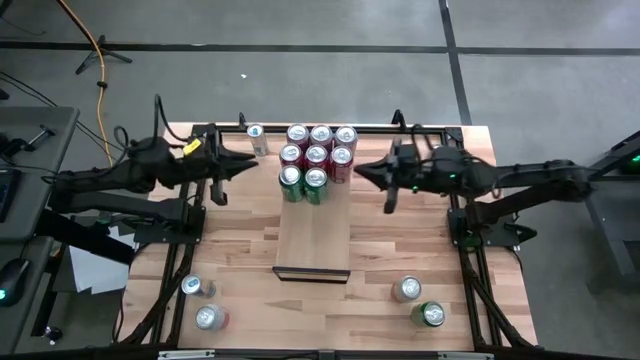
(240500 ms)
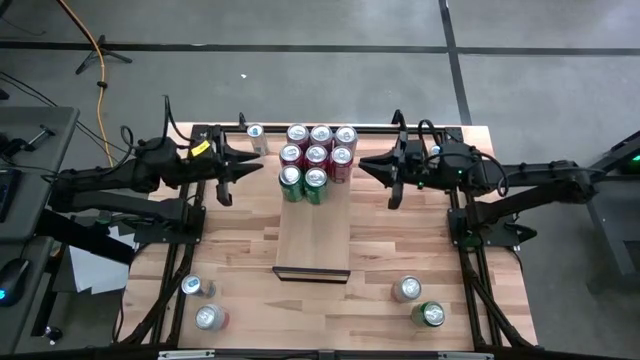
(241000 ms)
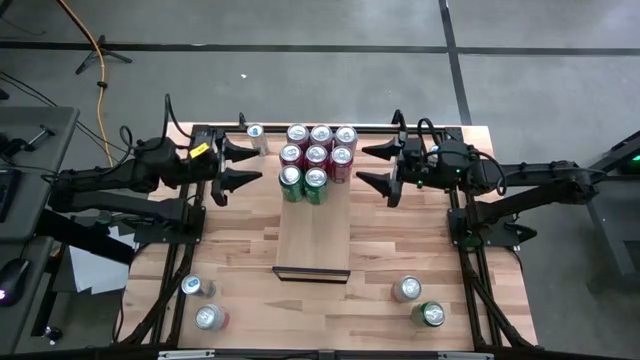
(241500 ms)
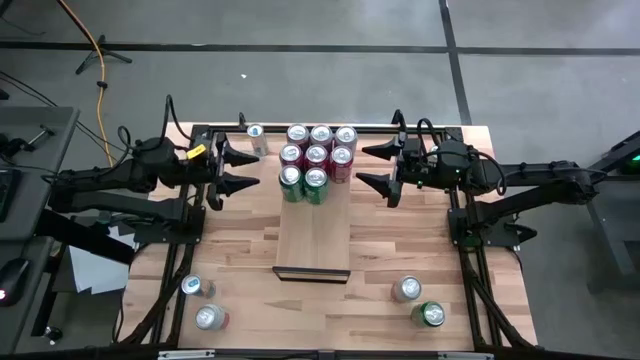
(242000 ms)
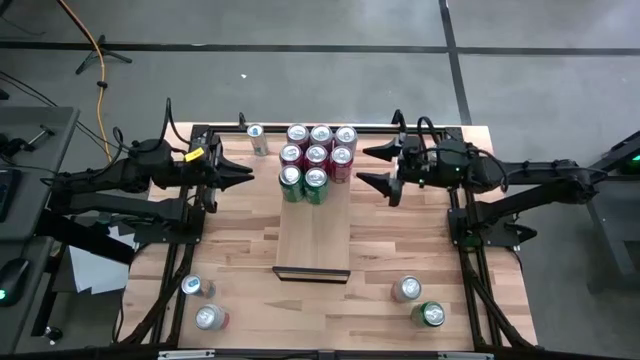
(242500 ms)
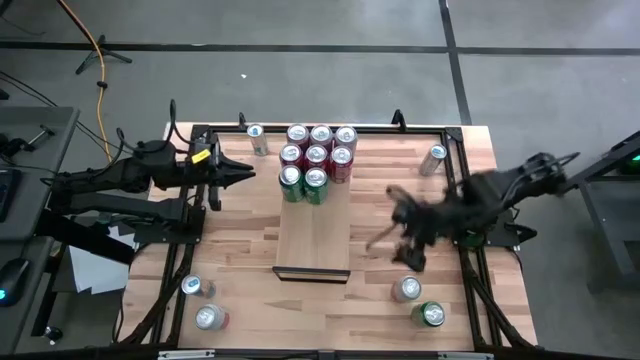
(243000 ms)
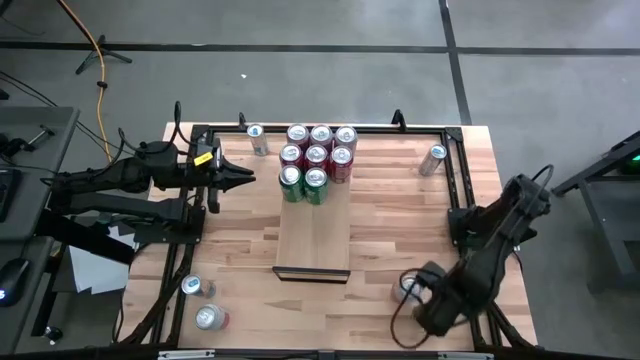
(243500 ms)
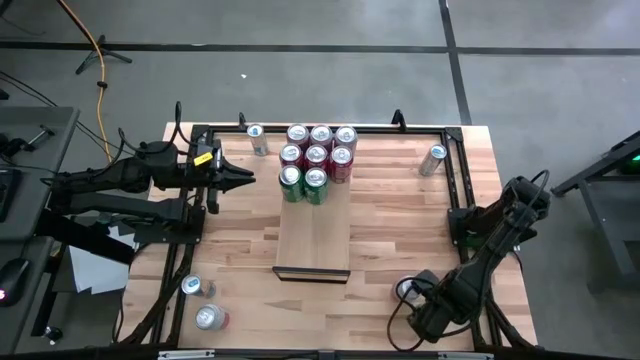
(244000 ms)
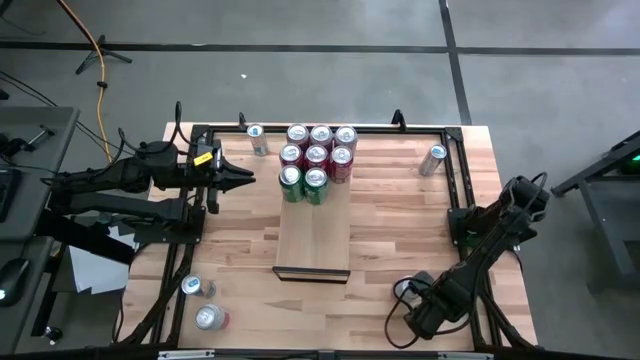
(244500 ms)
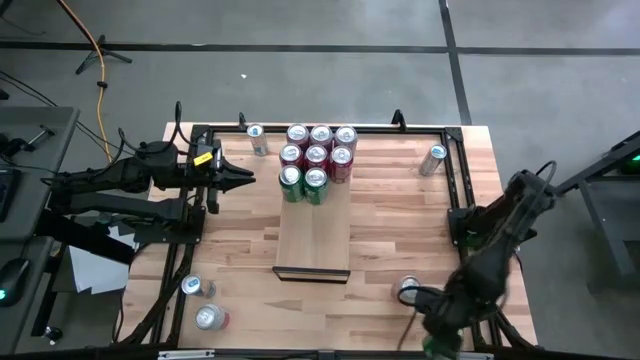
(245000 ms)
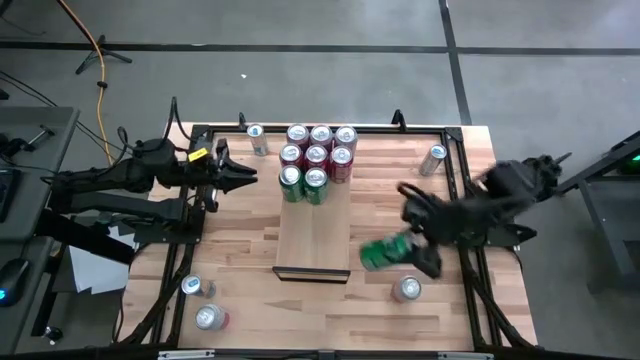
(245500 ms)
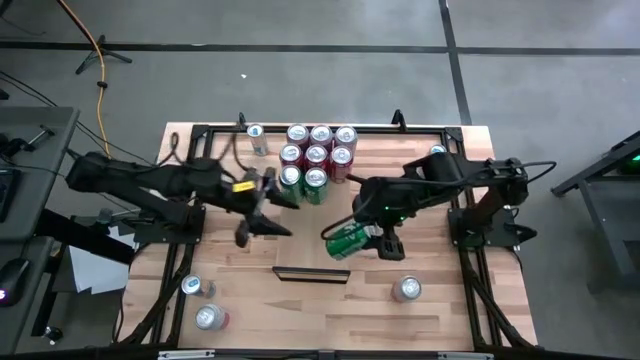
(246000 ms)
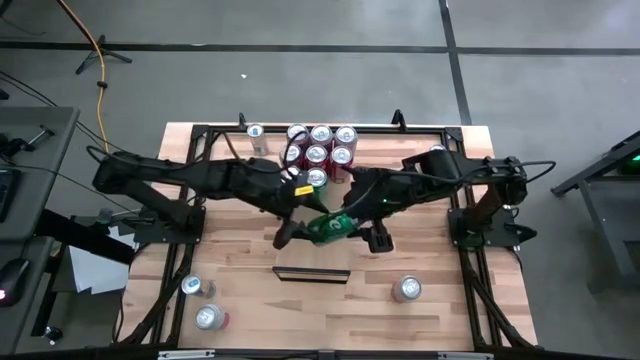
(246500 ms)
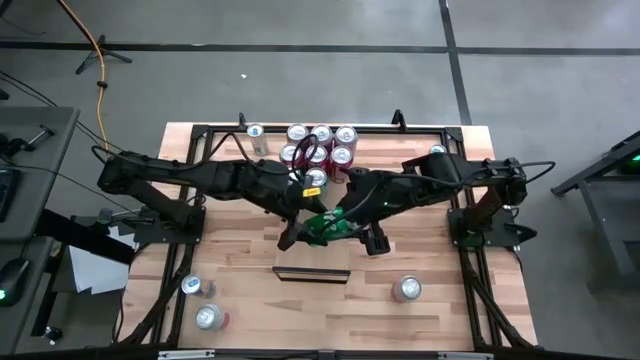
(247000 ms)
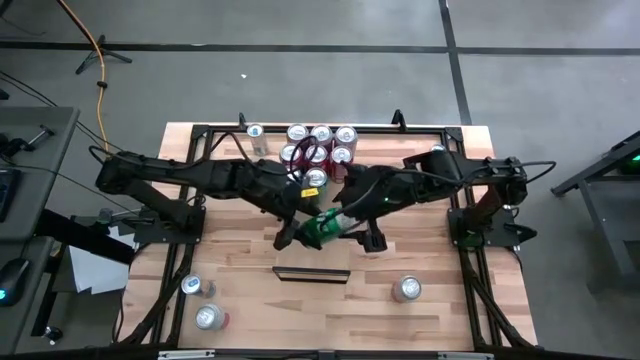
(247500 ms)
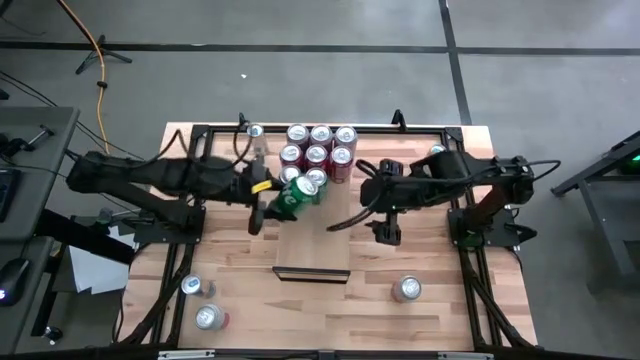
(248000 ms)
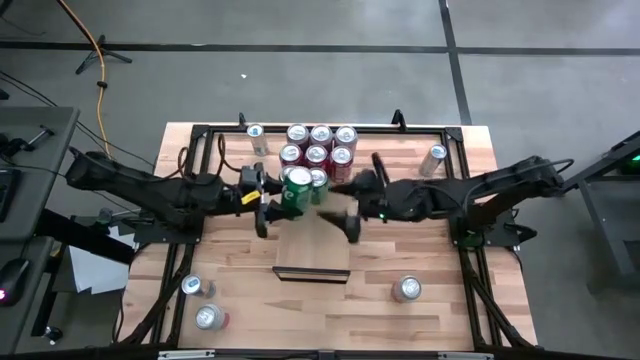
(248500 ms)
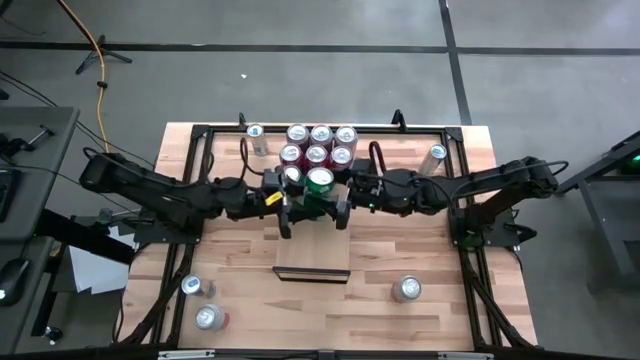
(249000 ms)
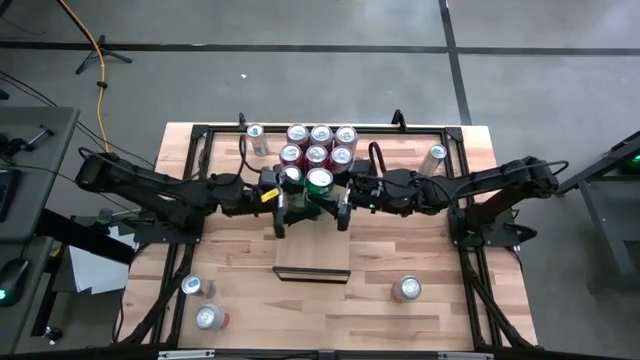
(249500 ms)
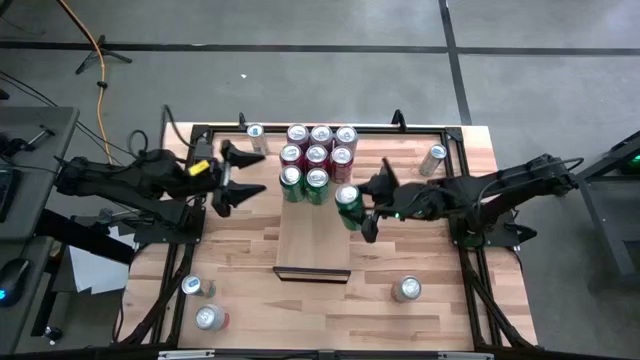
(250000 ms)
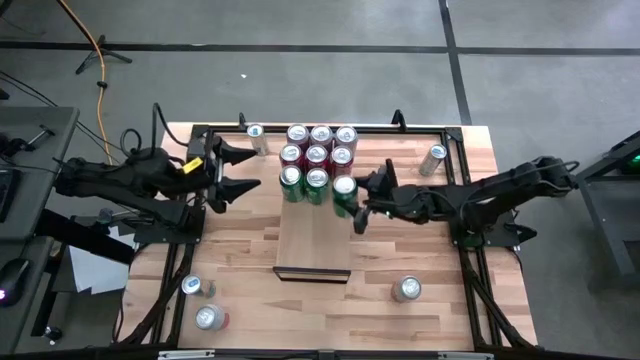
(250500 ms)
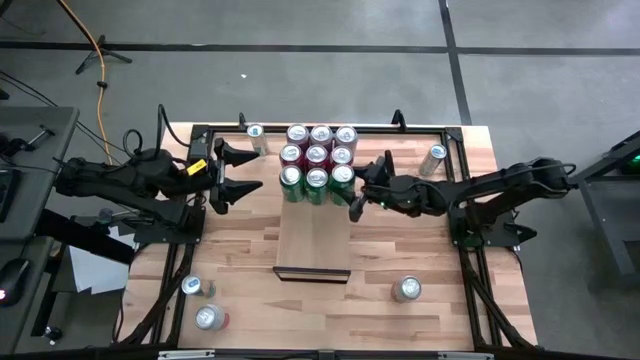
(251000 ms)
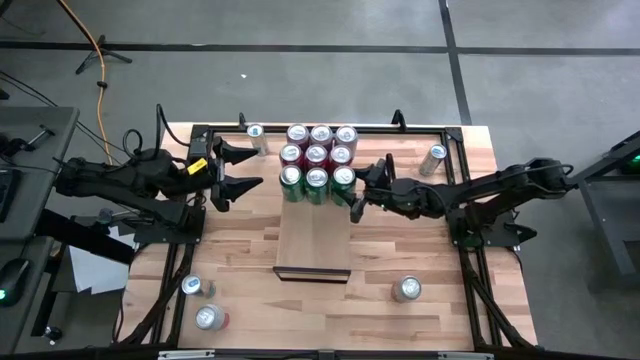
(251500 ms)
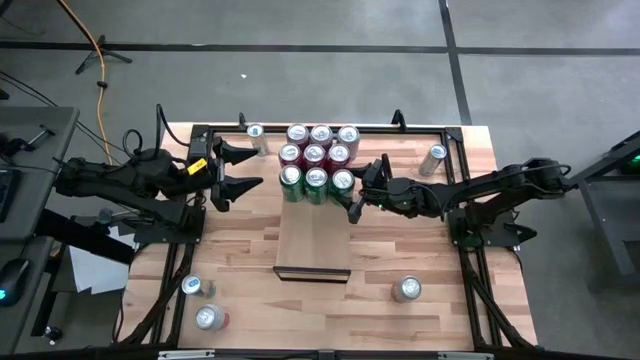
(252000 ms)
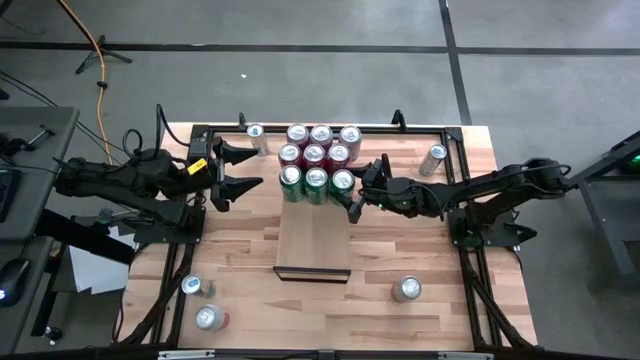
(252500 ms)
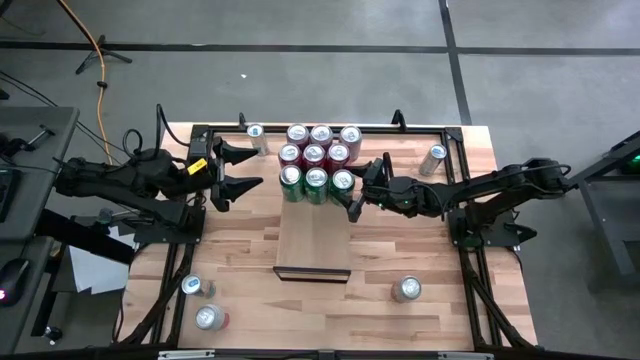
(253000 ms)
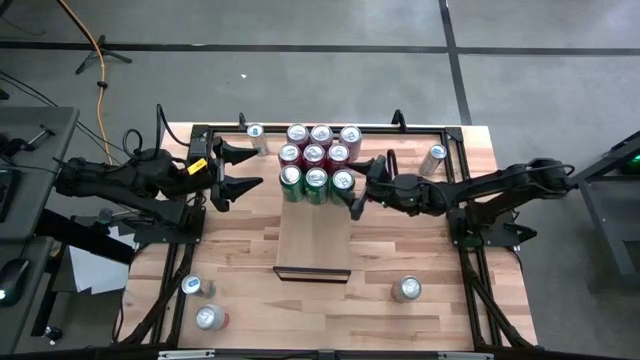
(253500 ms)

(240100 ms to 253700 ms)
Task: Place canned beverage on shelf
Put the green soda can on the shelf

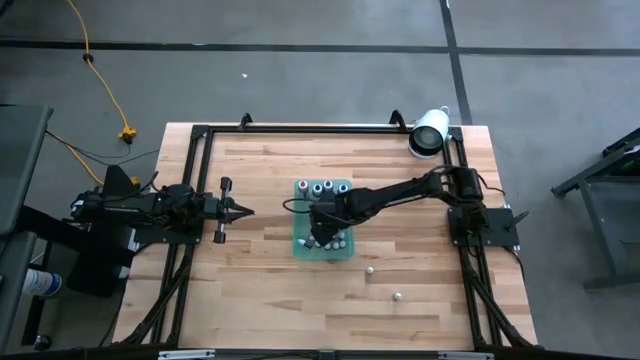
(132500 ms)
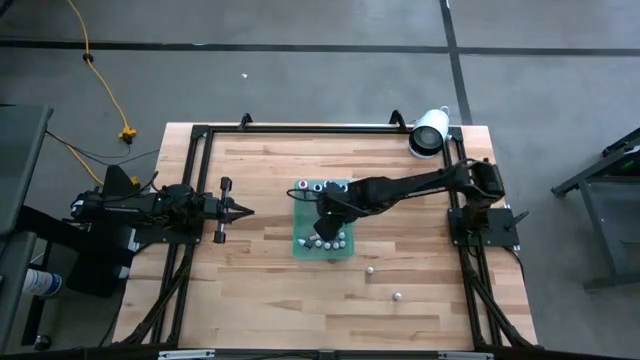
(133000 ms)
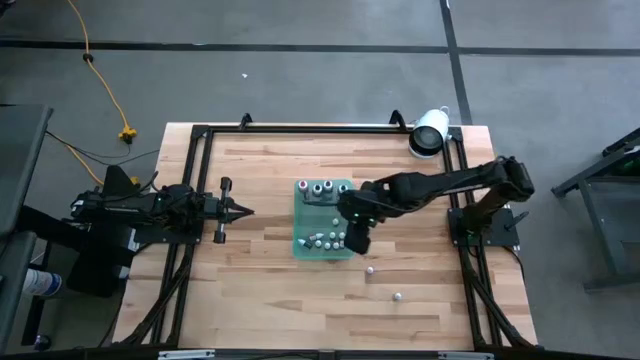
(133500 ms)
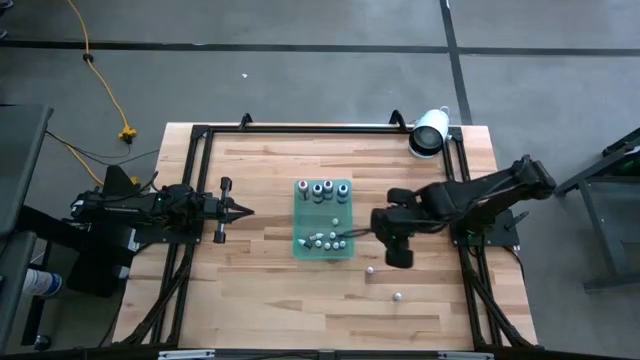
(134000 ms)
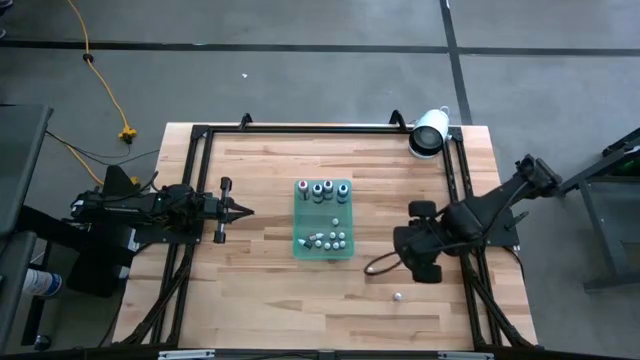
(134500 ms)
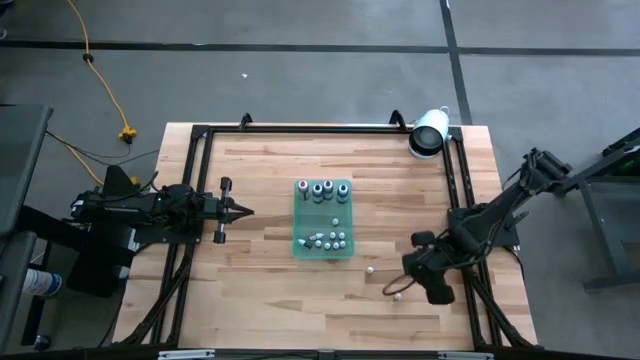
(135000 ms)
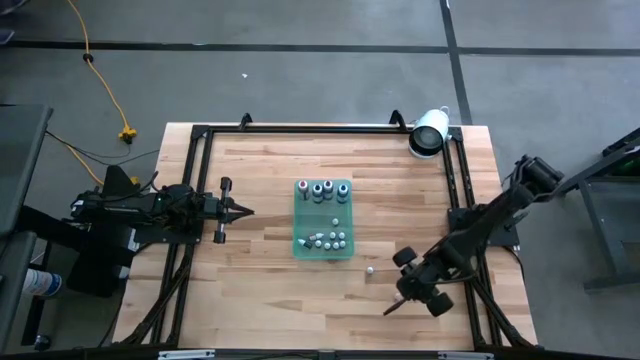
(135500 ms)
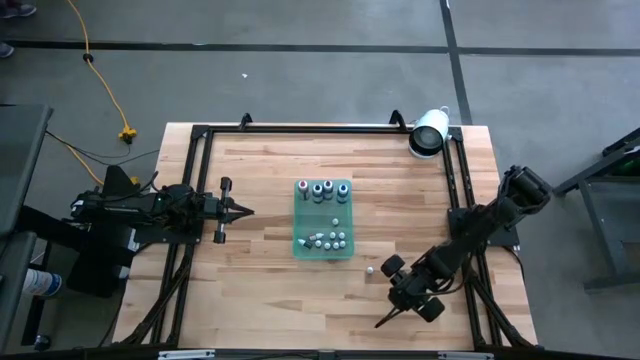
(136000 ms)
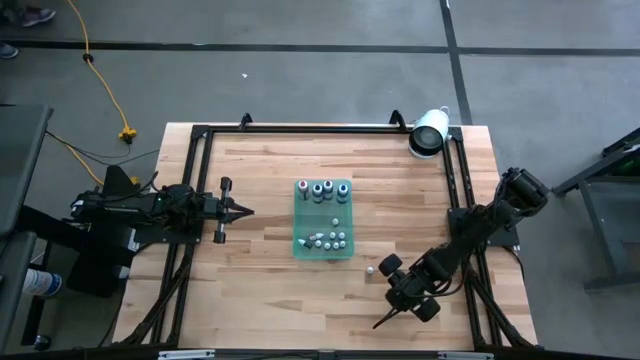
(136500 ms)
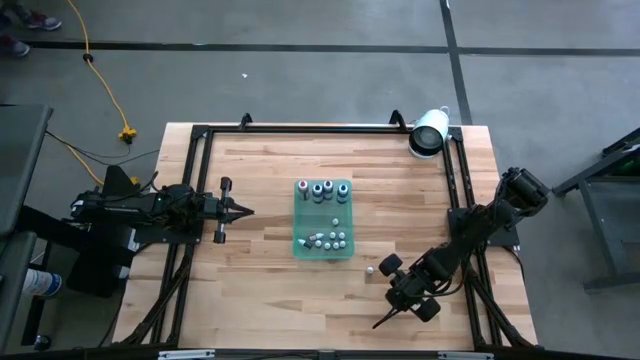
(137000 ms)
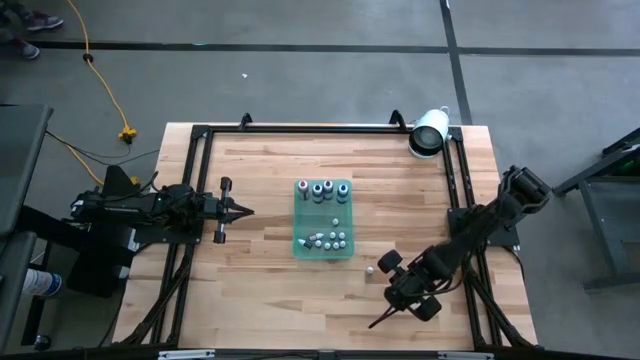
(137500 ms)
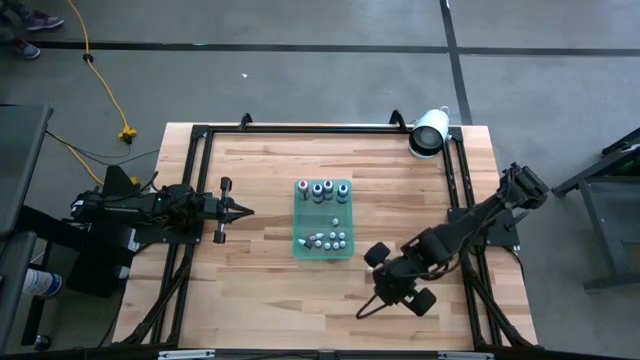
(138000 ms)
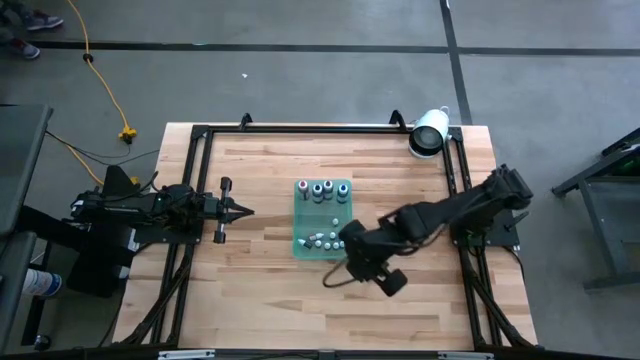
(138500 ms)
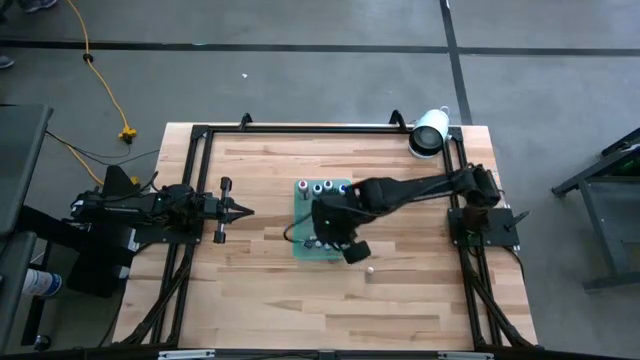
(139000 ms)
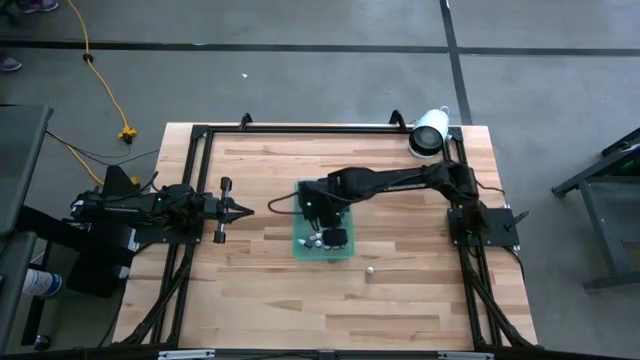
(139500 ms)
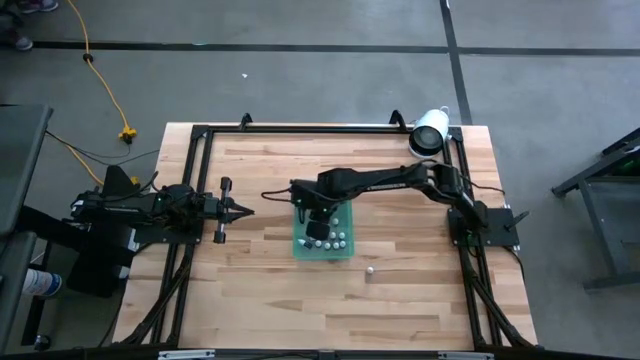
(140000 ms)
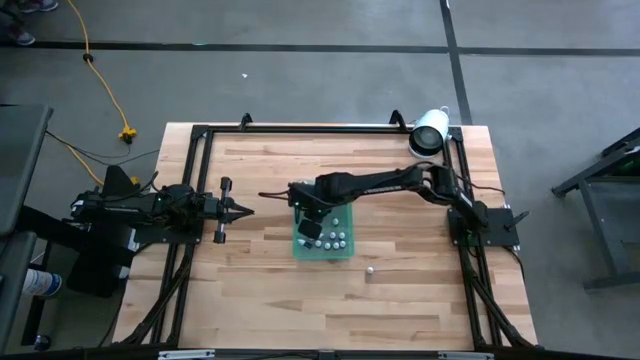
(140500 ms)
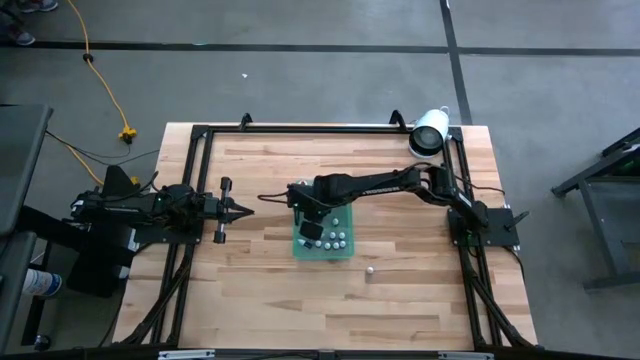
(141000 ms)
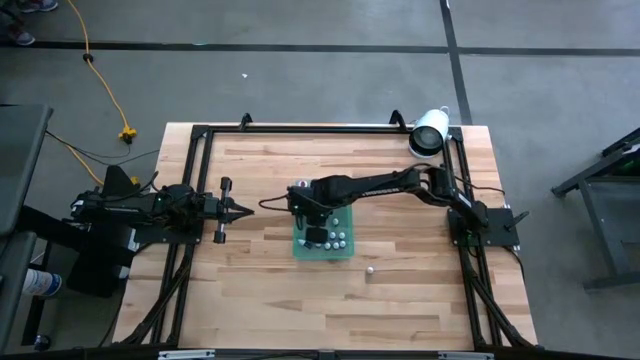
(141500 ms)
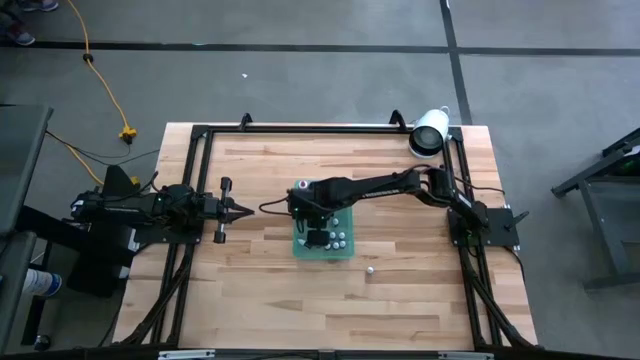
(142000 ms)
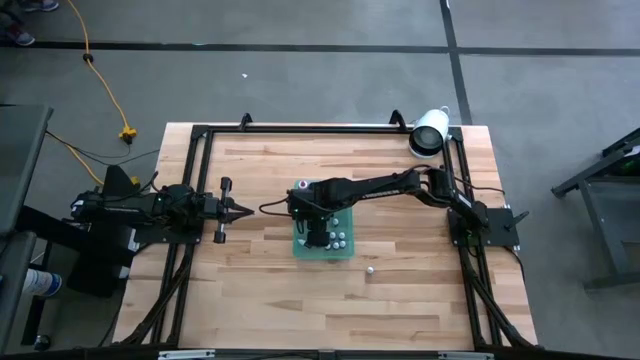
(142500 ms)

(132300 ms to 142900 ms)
Task: Pick & Place food coloring
Put the small orange food coloring bottle into the green bin
